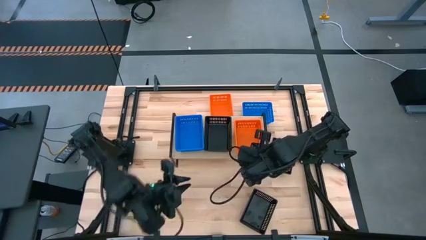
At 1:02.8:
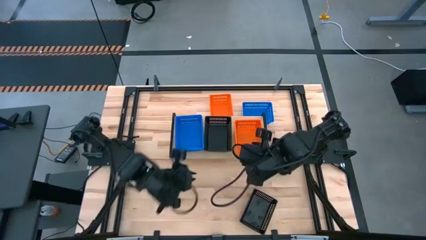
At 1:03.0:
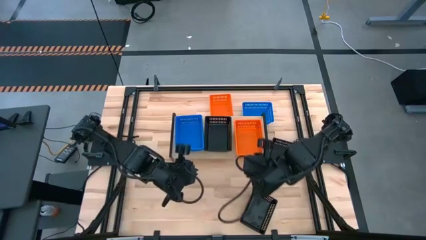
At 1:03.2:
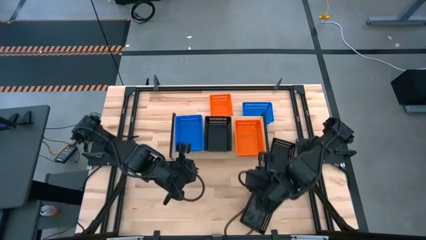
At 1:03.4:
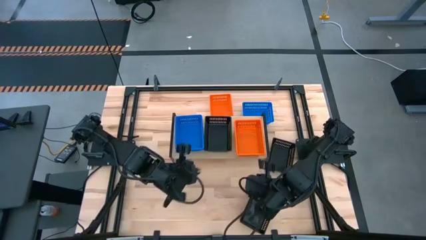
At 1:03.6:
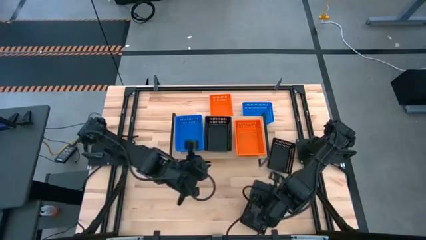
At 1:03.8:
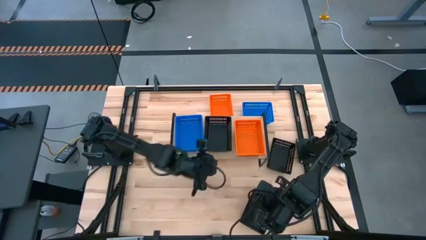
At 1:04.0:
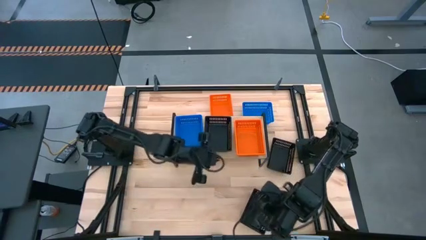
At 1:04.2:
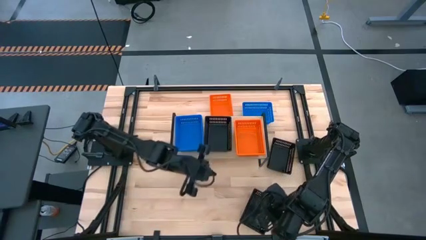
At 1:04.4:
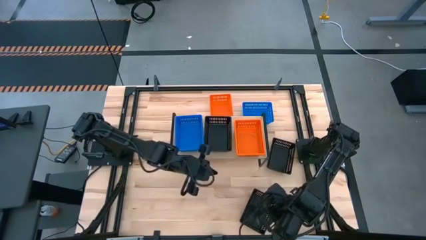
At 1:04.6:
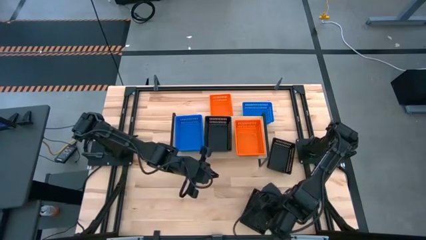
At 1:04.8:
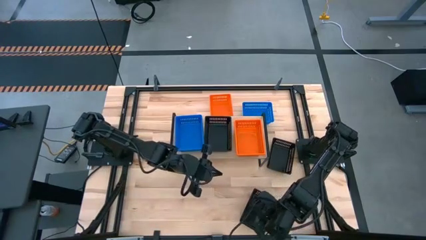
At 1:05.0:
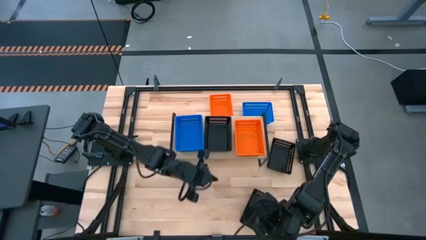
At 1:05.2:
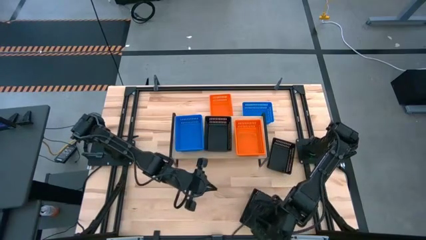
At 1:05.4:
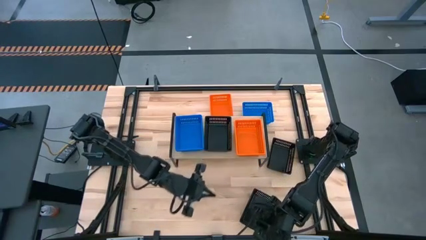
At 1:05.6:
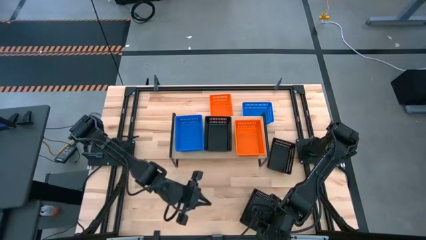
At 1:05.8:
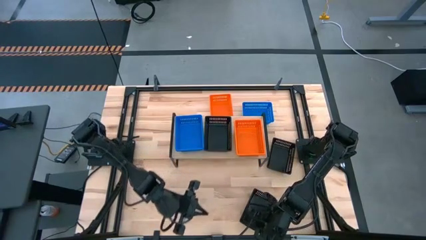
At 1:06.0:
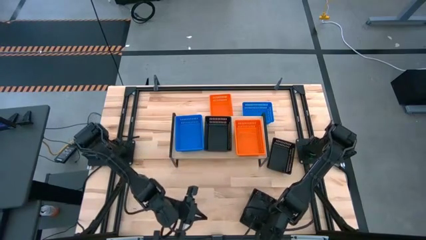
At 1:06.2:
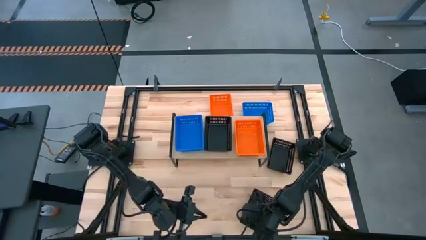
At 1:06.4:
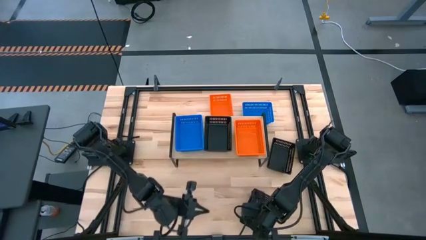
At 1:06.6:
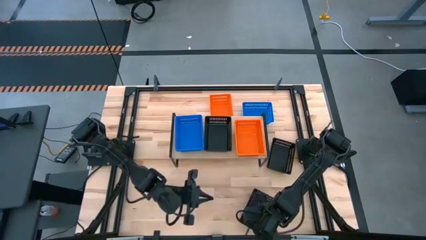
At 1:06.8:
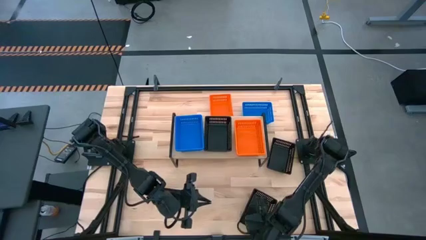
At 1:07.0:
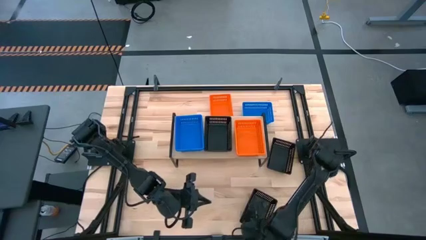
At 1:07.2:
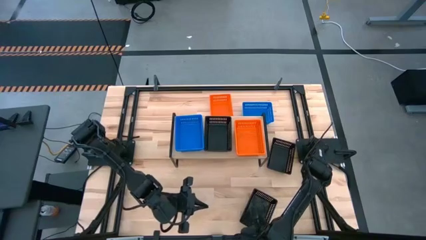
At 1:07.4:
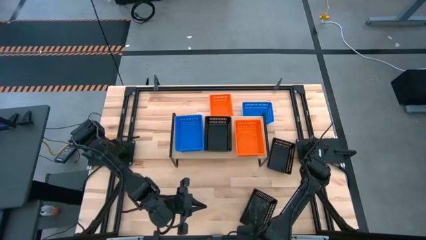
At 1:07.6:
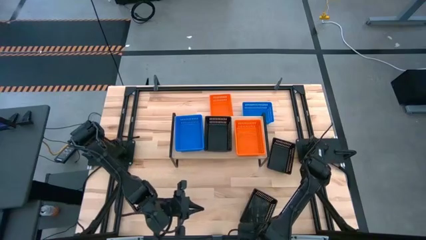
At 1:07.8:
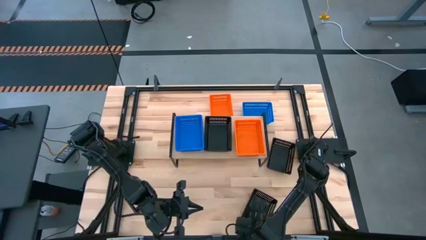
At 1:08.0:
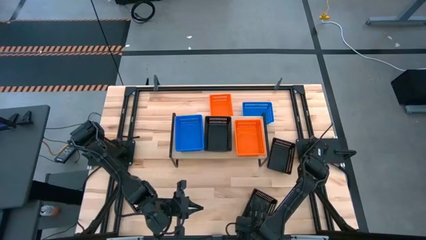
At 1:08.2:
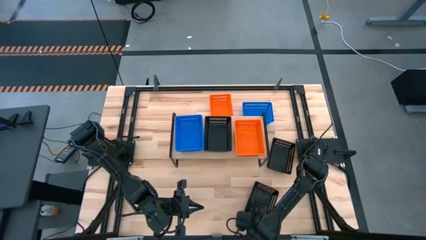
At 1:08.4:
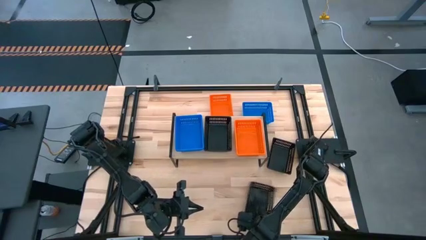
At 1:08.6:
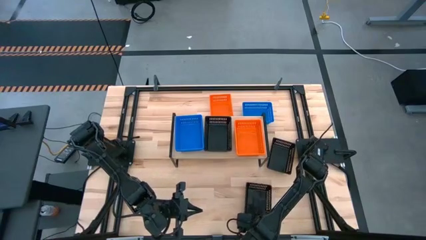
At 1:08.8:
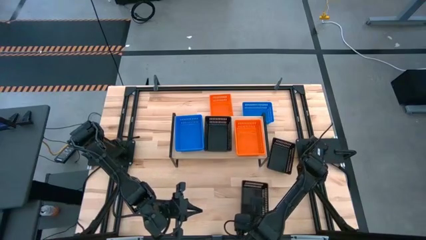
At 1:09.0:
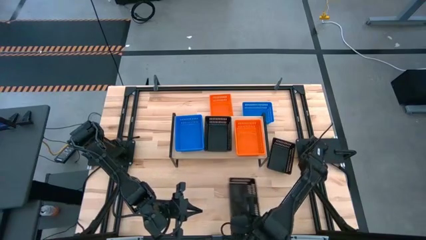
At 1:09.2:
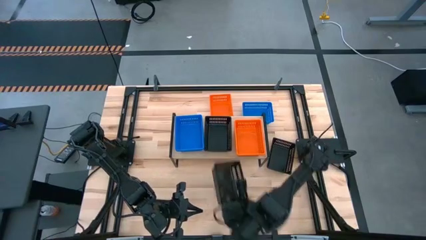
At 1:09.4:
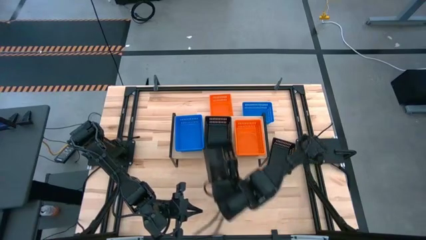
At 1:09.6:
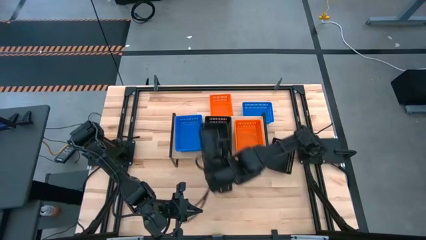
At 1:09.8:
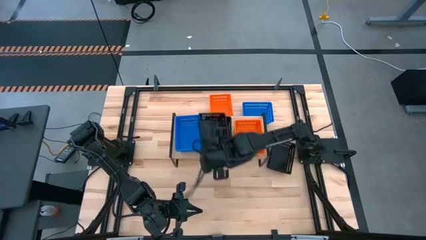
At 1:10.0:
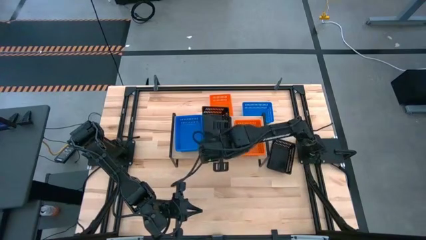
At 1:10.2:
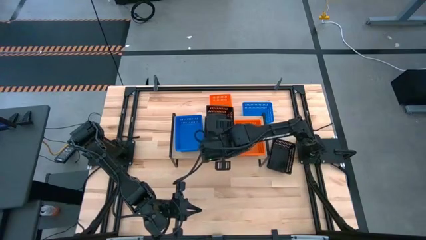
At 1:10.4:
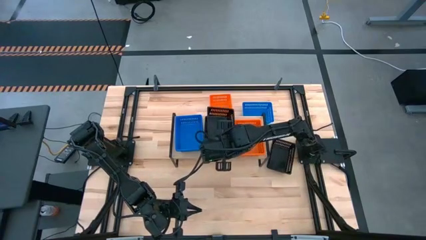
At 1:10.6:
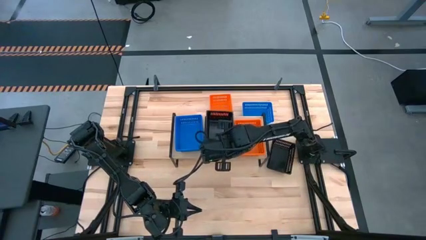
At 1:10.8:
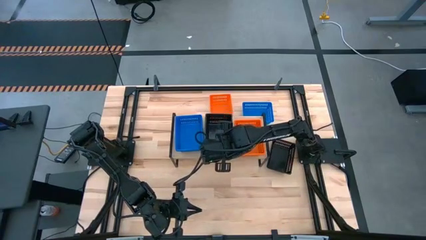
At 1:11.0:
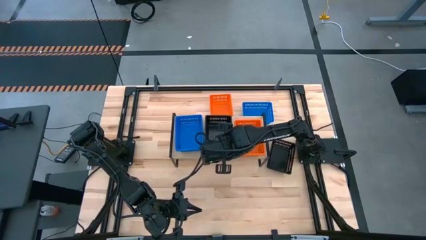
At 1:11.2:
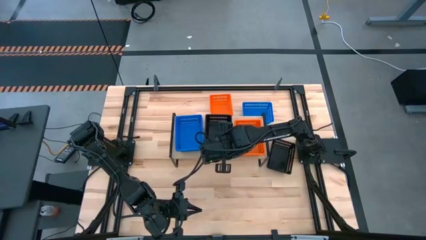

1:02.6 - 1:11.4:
Task: Stack baskets on shelf by color
Stack the bottom black basket on the black basket on the shelf

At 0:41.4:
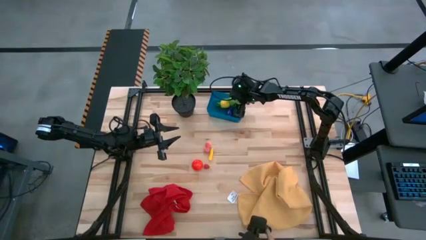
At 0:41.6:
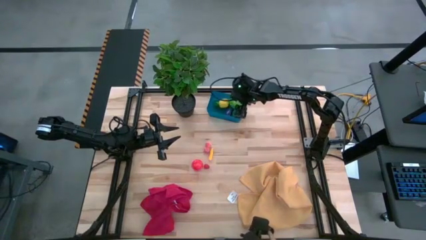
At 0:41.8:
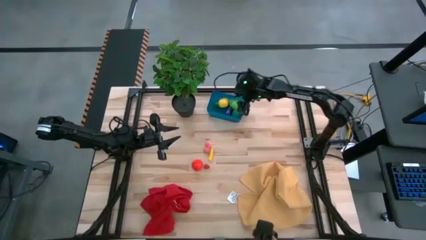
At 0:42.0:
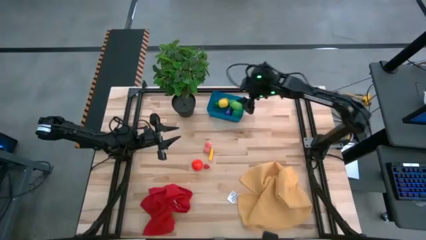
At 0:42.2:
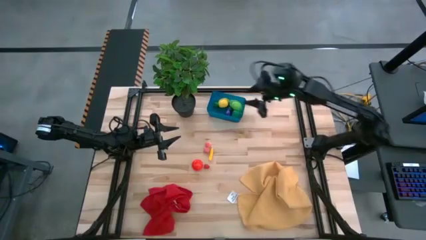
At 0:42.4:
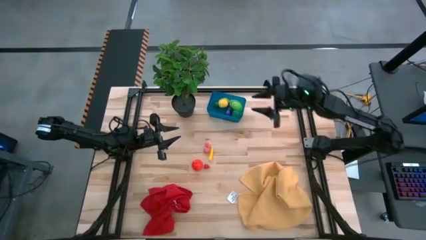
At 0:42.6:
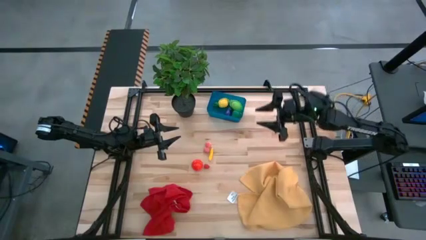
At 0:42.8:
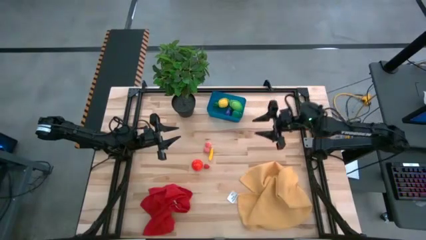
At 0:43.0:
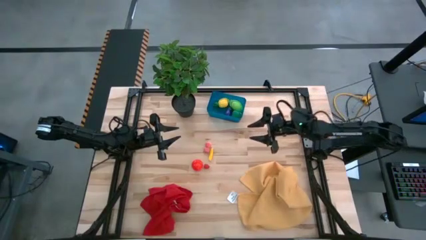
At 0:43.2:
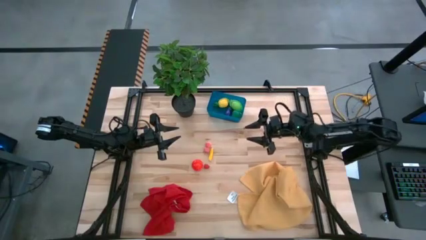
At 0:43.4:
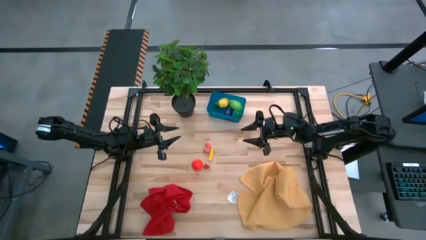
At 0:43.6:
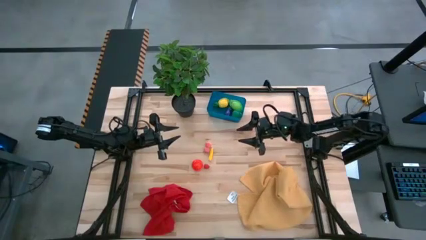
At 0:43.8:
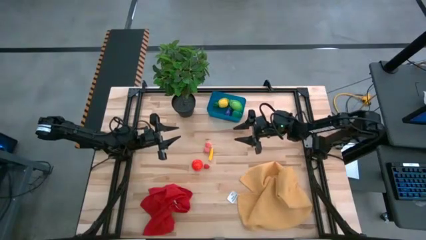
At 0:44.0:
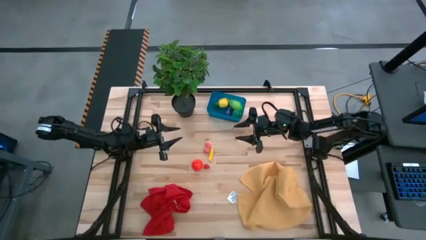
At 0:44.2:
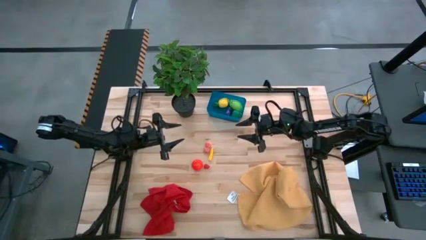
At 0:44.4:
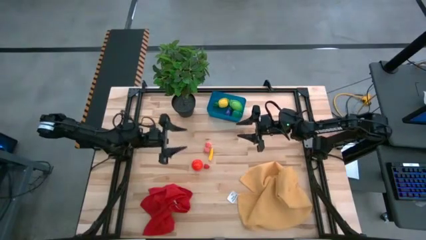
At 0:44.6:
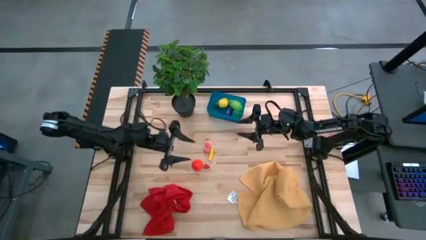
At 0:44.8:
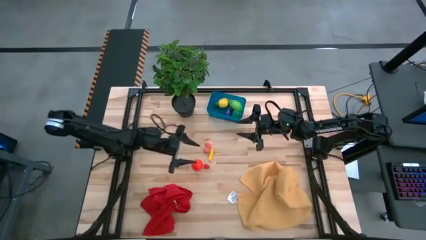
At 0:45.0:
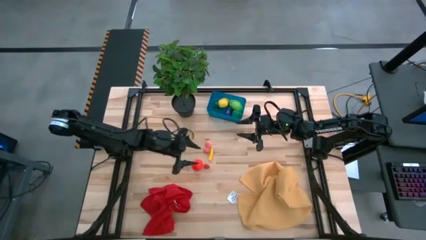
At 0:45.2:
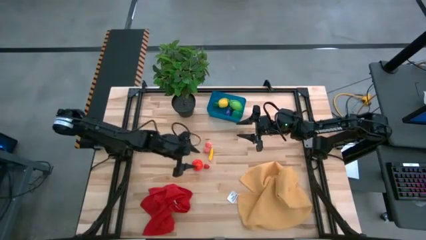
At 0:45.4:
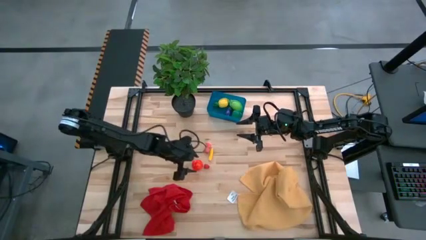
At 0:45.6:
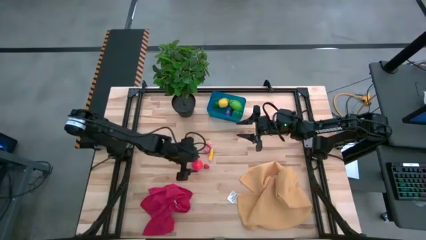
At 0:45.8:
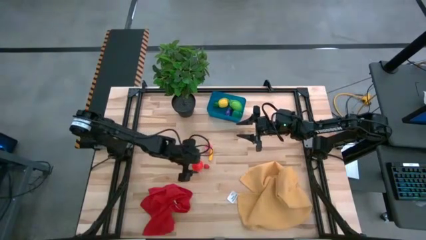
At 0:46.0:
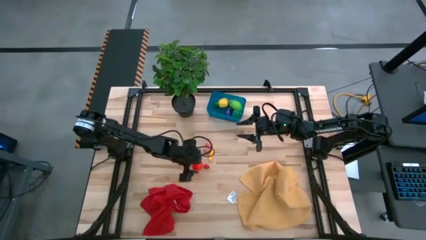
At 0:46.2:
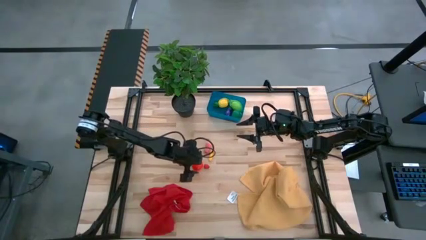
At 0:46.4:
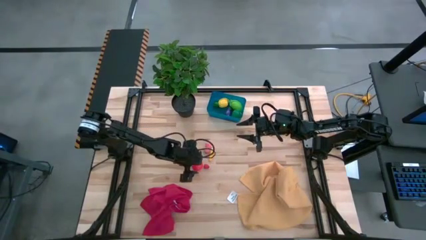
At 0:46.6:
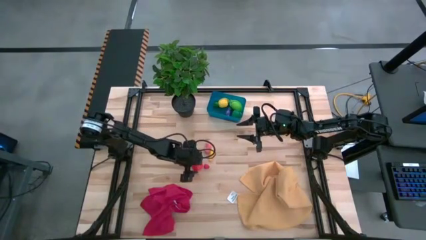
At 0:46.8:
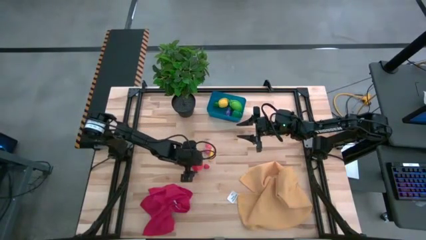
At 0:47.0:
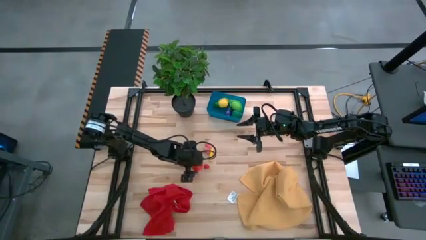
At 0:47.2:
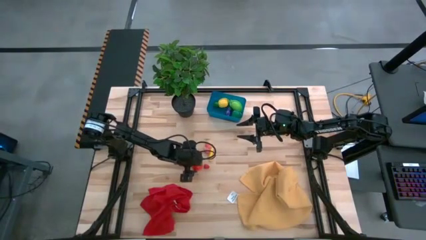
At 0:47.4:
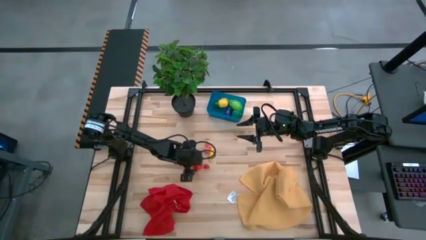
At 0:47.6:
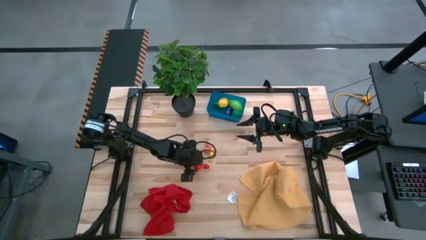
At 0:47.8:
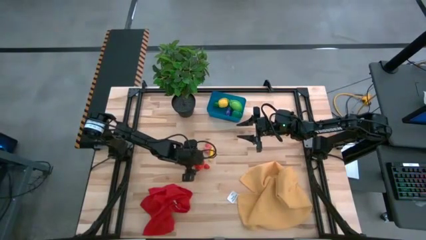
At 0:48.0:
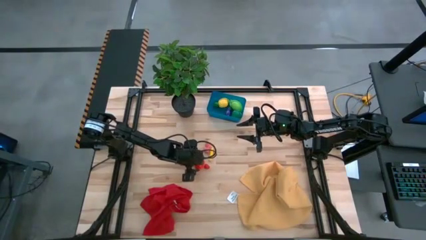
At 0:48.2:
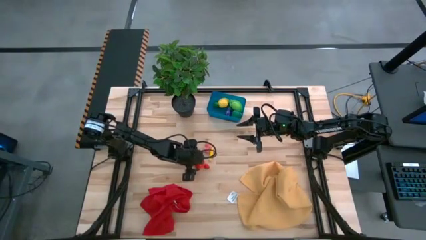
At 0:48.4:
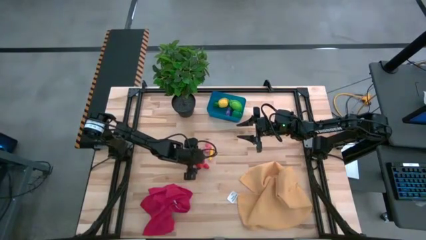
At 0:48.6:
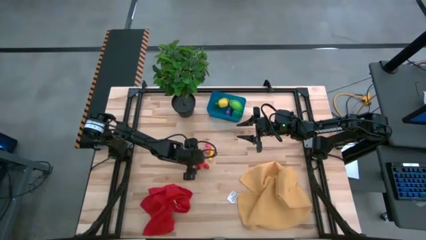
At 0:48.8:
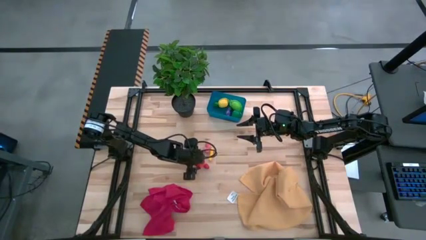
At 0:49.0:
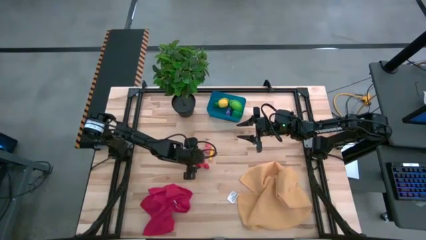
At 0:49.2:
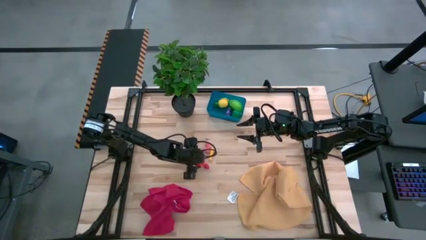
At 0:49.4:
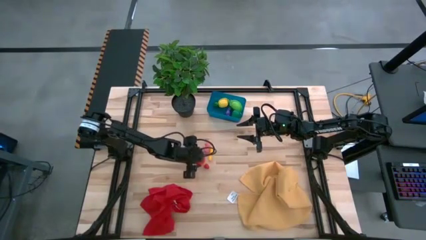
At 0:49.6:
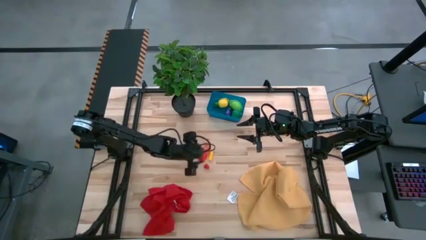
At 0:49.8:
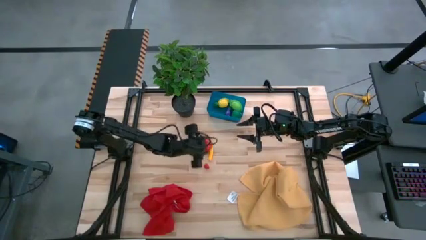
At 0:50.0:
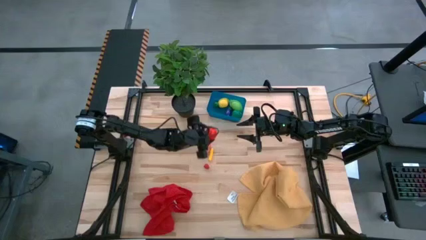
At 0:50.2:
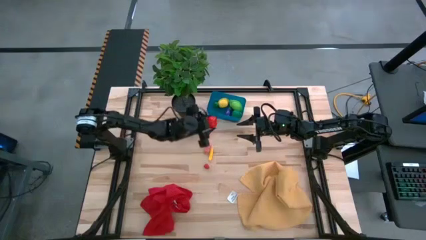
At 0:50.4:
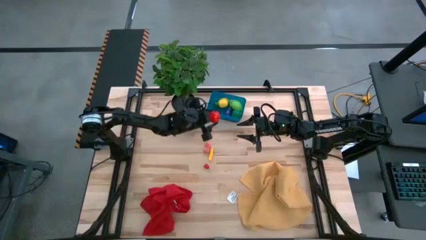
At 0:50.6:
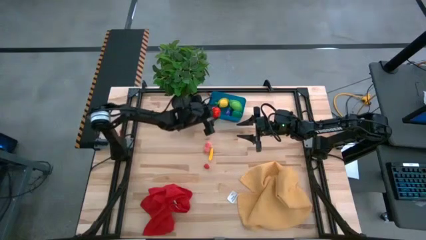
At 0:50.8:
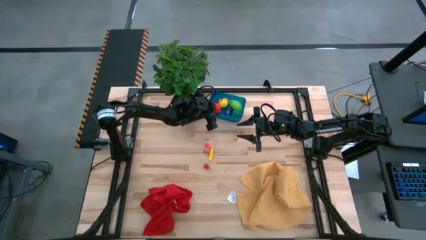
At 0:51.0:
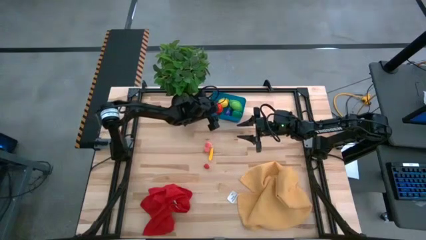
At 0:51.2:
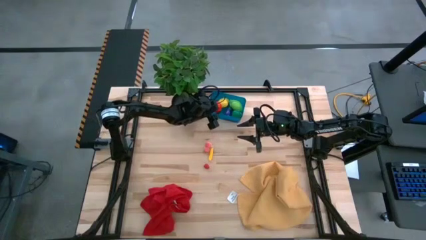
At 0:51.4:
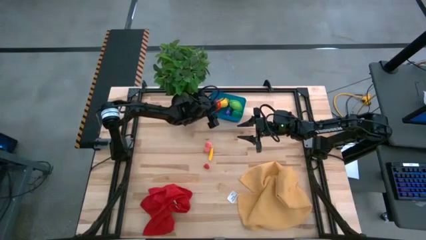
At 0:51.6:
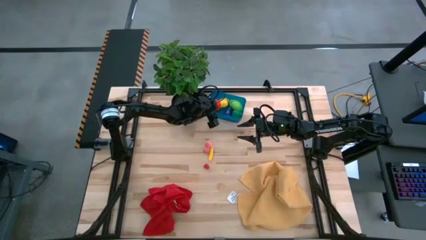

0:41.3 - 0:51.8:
Task: Pick and placing Produce into tupperware
Put the orange tomato into the blue bin
